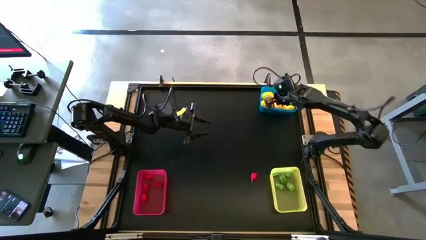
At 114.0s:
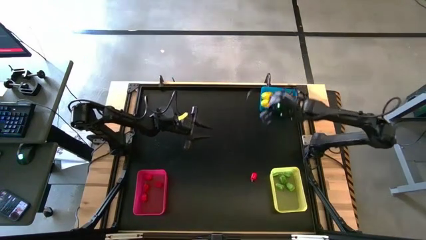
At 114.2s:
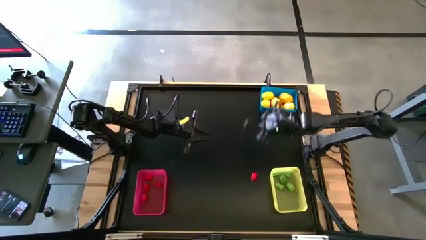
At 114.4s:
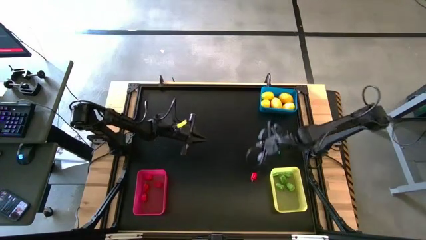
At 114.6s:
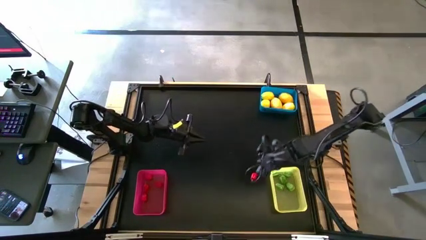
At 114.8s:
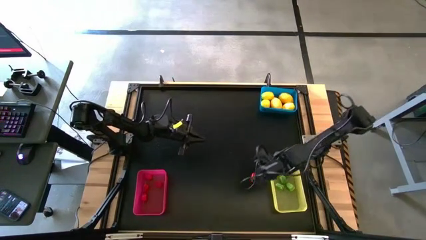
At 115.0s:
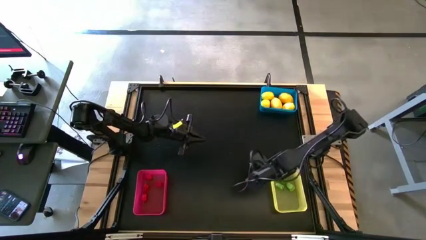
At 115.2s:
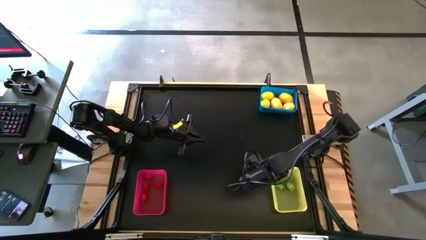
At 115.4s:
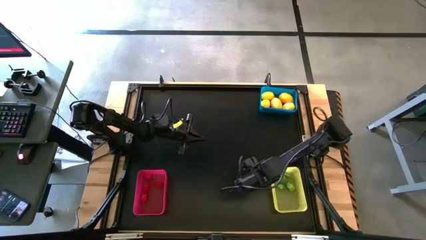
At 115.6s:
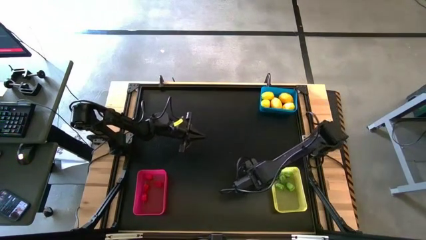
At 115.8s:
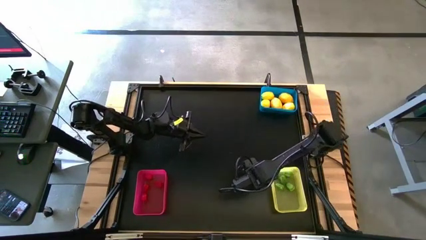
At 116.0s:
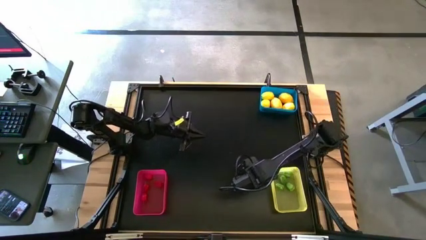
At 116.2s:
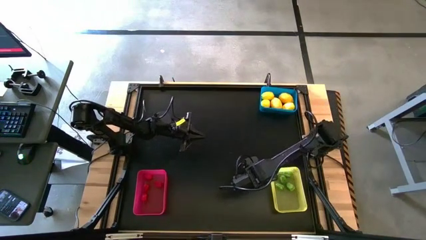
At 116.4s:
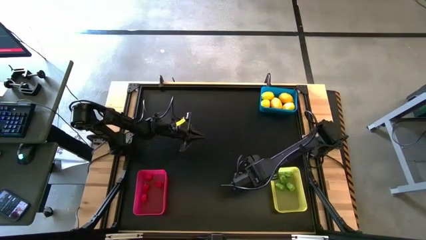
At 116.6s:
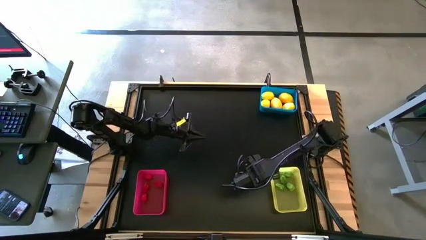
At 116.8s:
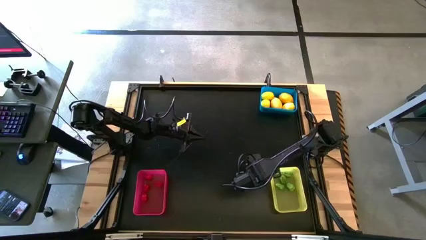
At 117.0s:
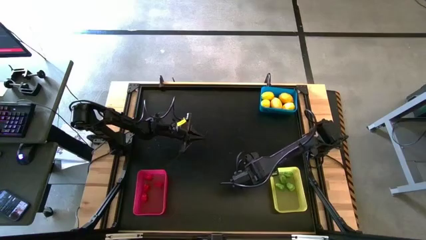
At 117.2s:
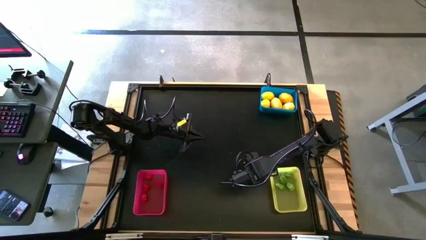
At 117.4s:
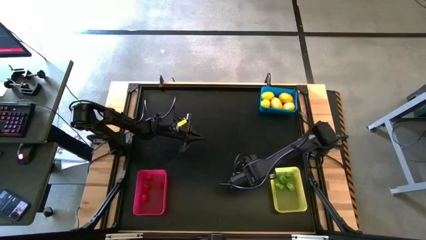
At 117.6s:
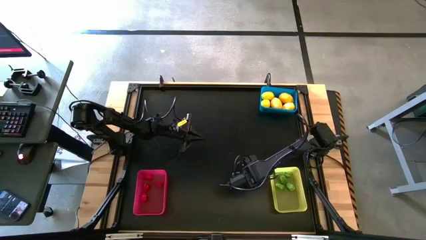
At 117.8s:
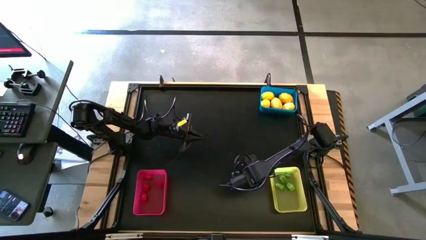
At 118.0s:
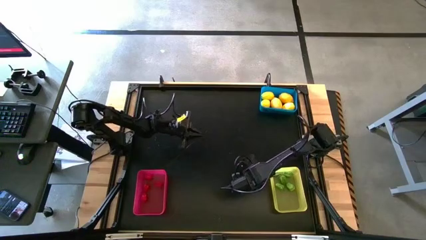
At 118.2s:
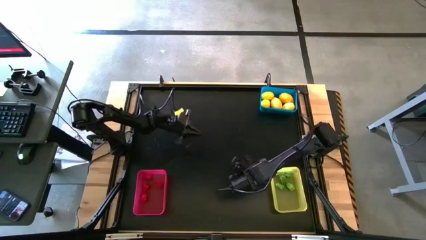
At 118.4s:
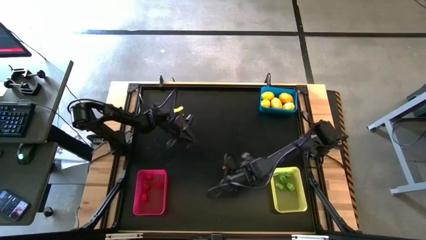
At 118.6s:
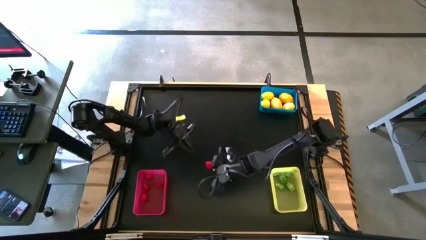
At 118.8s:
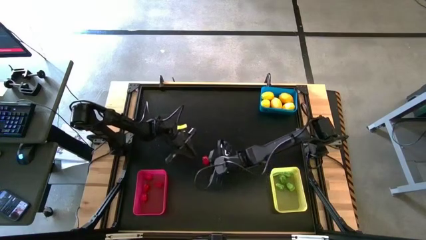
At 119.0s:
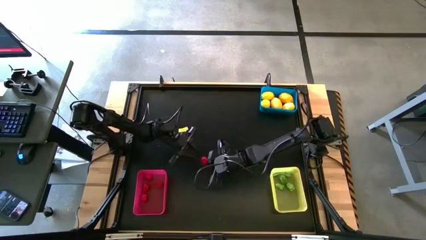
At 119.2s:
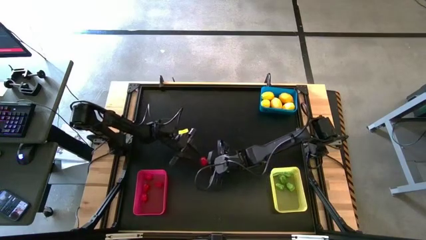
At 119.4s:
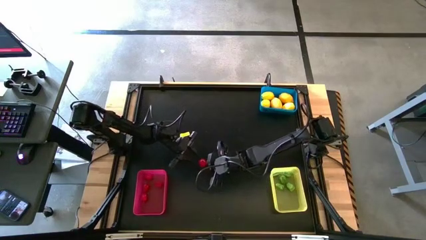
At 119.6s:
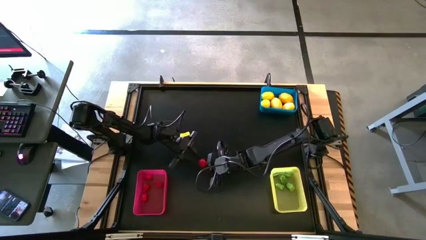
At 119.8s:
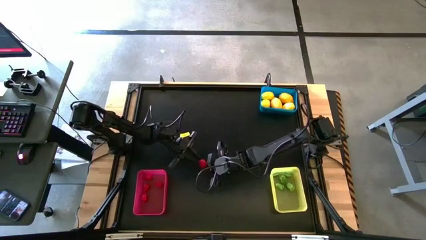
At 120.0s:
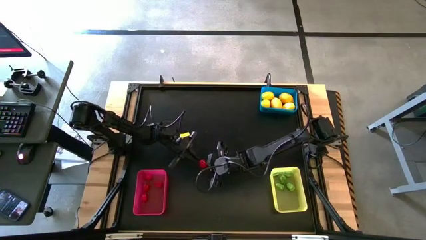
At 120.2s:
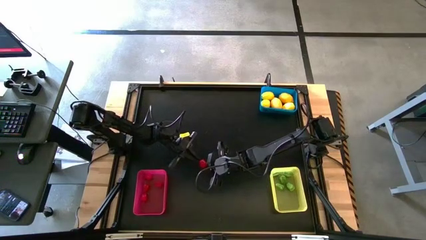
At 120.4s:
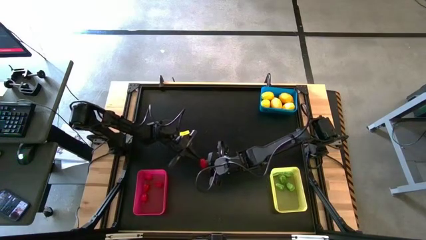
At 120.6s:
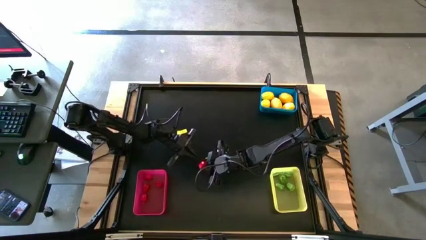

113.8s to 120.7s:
Task: Sort produce into baskets
Put the red chili pepper into the red bin

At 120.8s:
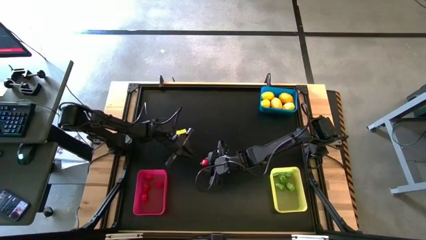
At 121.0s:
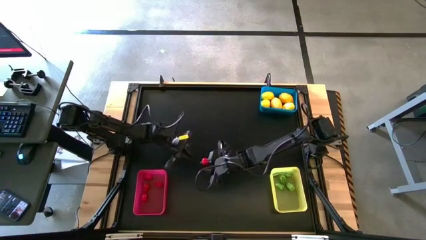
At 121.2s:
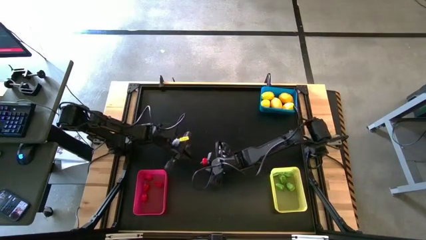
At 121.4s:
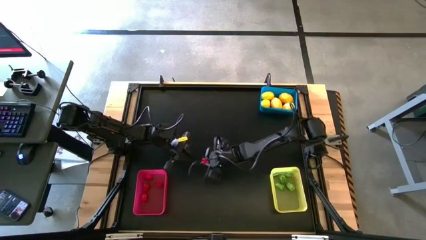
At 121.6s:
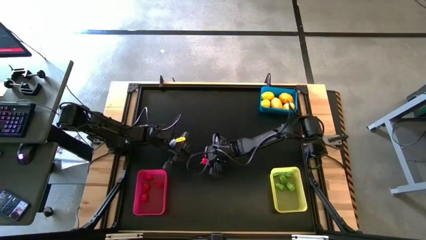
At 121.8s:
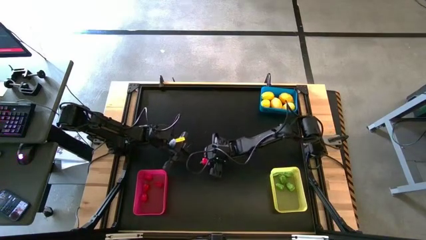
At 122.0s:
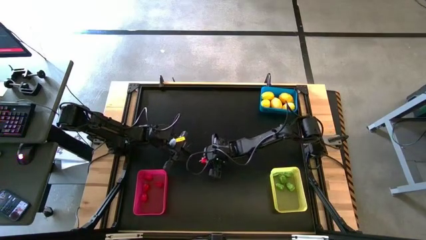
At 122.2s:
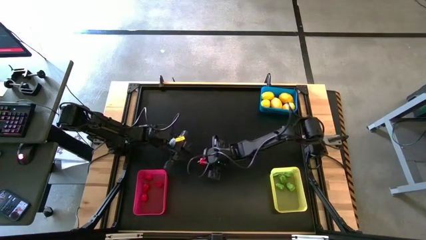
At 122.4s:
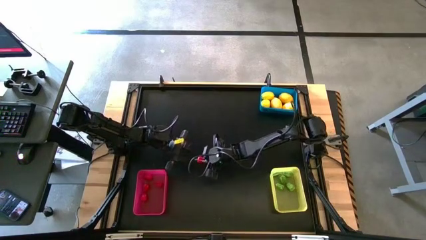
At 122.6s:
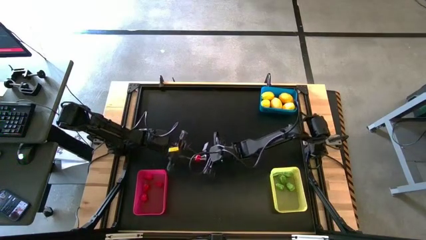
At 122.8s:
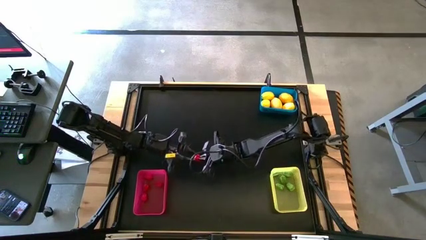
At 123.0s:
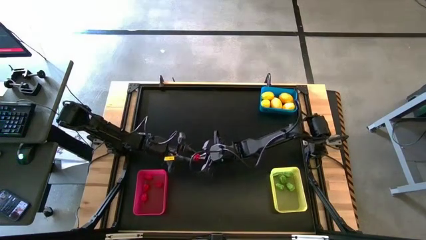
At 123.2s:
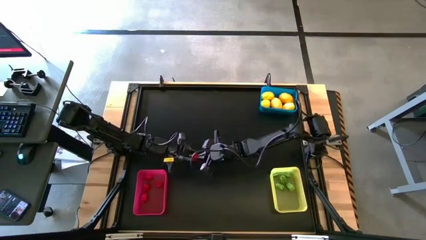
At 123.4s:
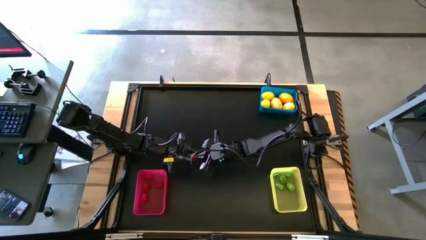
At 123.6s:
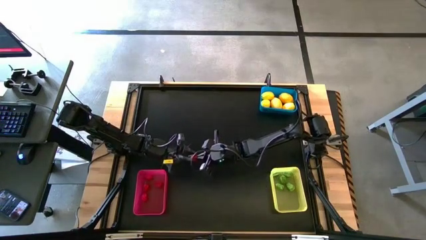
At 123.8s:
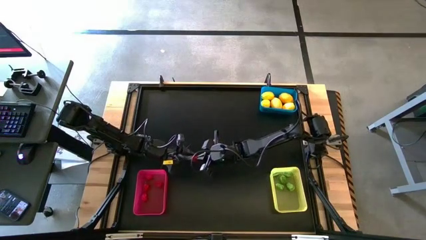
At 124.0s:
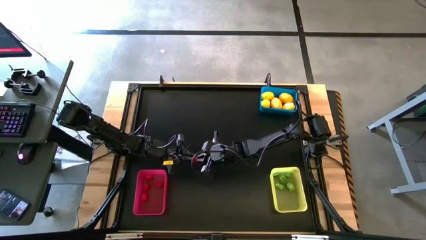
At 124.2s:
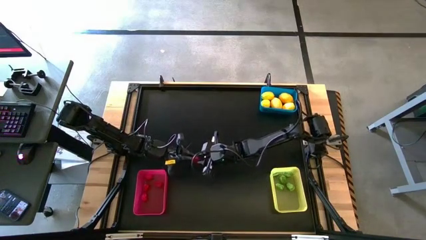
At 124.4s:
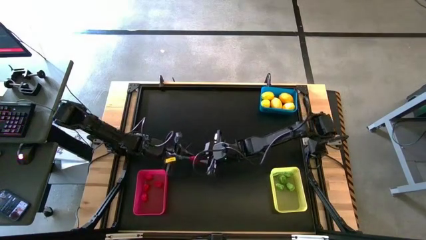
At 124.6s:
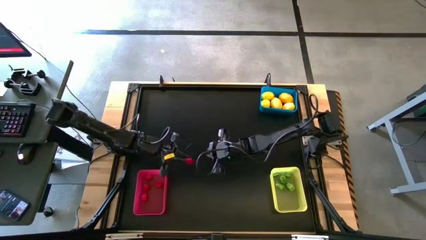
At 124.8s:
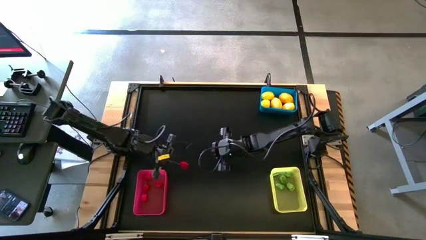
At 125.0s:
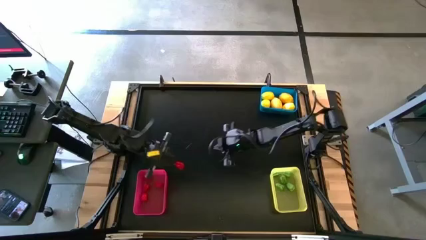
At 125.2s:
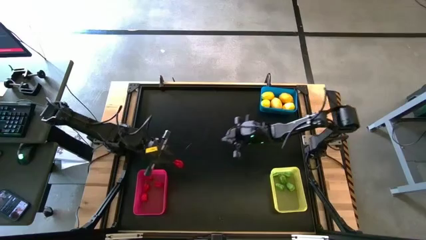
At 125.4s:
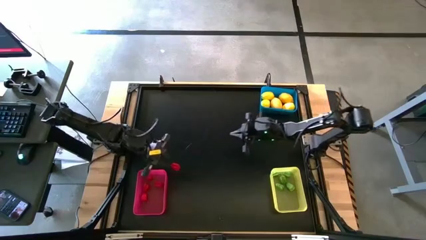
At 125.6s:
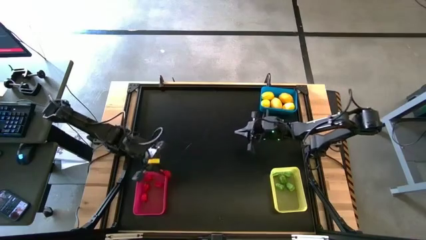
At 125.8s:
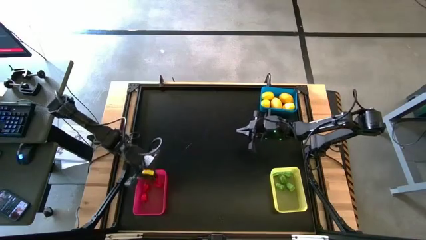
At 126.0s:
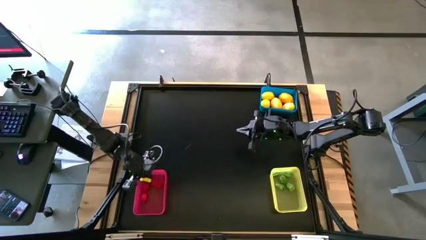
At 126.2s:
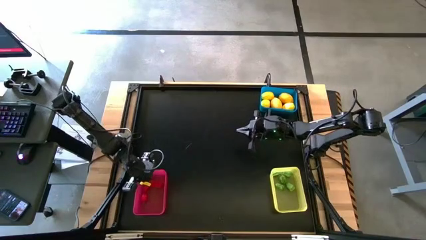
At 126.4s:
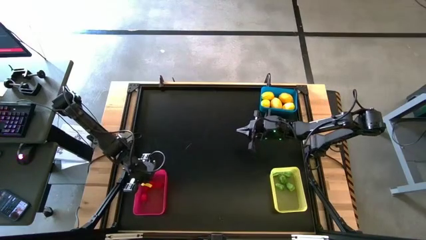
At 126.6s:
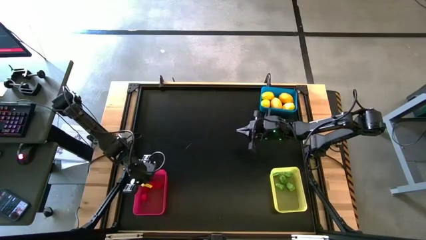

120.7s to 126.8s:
Put the red chili pepper into the red bin

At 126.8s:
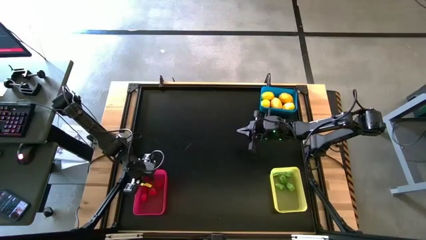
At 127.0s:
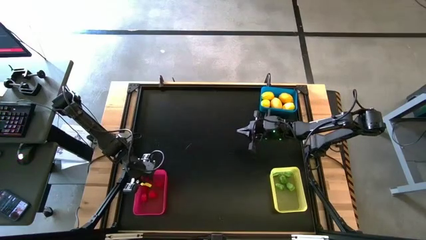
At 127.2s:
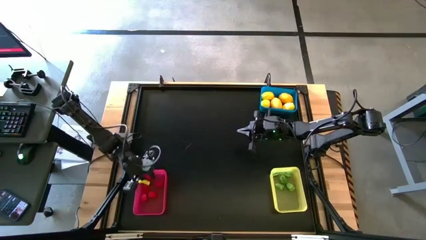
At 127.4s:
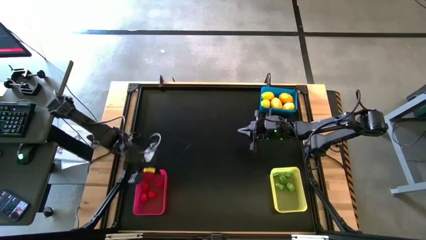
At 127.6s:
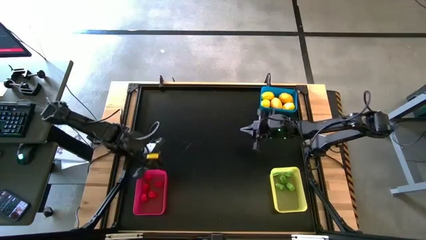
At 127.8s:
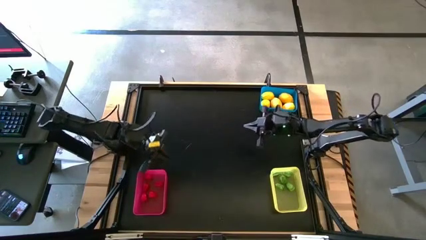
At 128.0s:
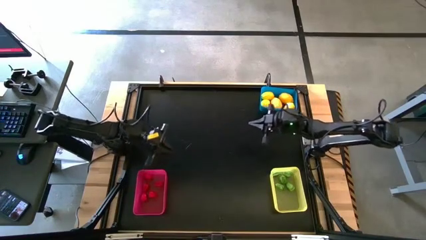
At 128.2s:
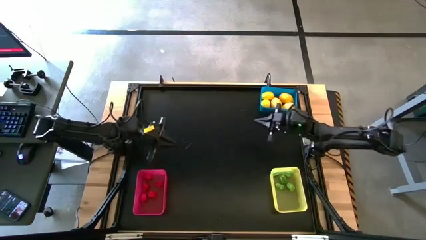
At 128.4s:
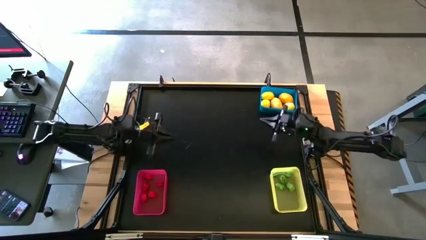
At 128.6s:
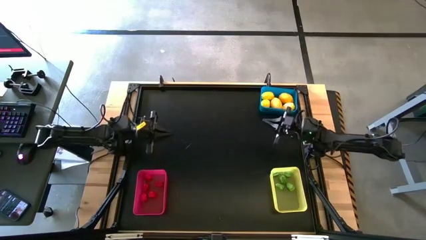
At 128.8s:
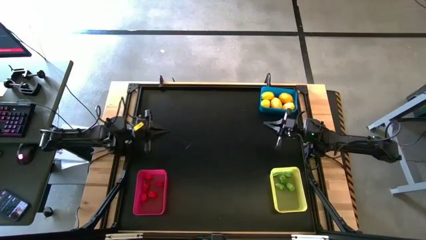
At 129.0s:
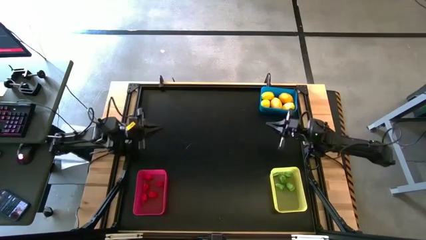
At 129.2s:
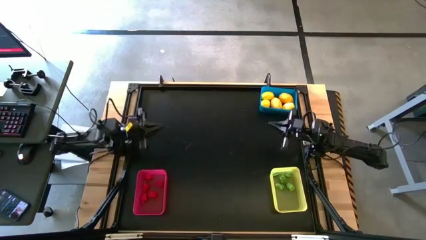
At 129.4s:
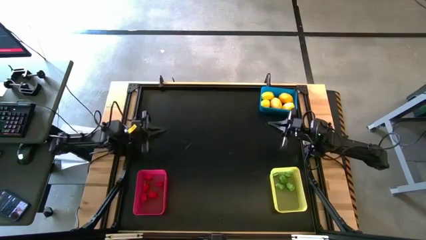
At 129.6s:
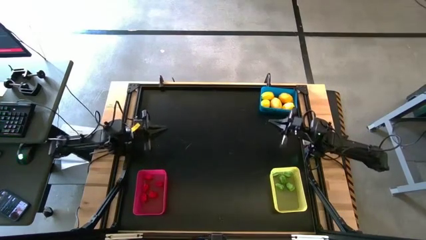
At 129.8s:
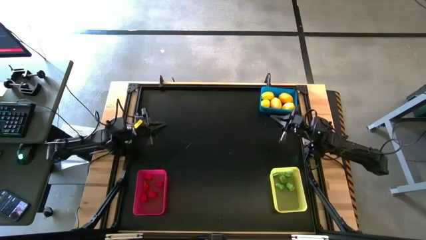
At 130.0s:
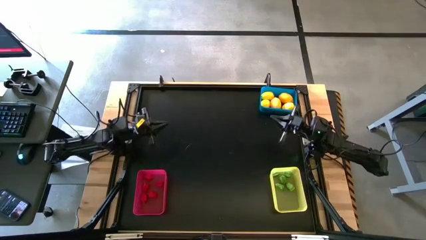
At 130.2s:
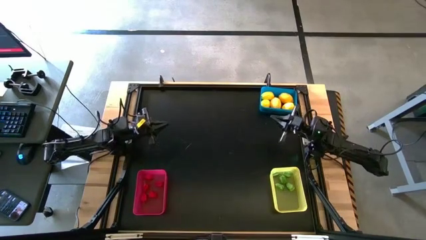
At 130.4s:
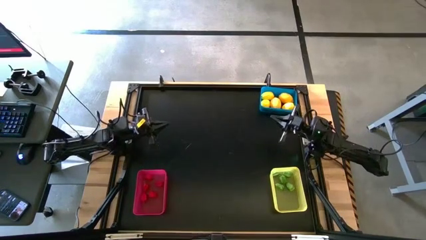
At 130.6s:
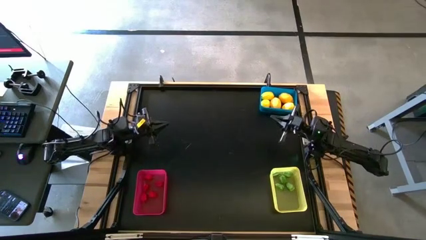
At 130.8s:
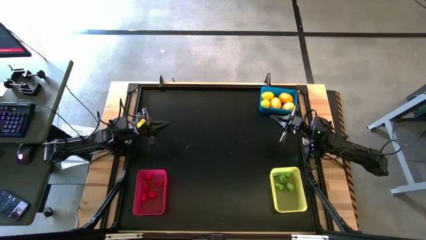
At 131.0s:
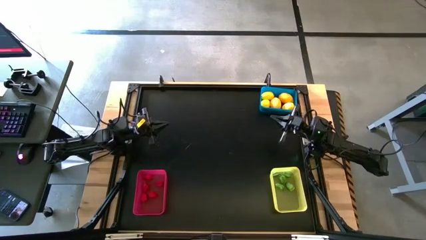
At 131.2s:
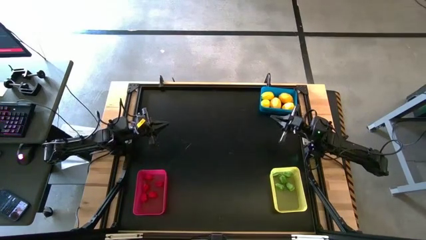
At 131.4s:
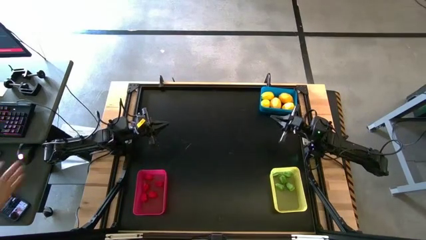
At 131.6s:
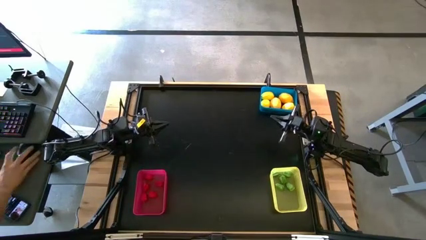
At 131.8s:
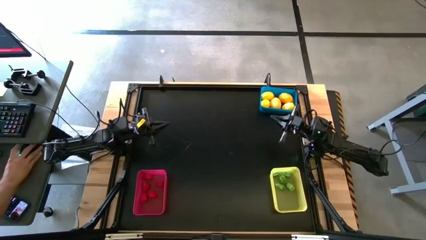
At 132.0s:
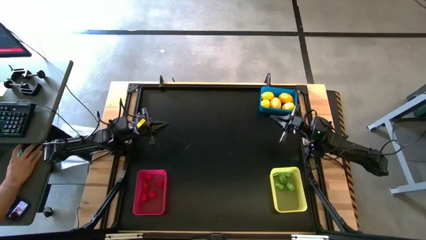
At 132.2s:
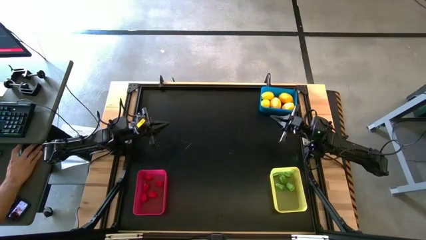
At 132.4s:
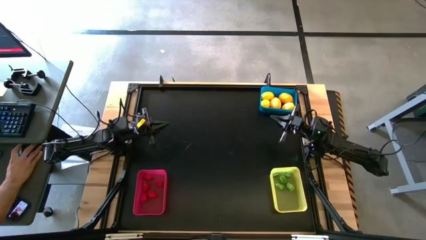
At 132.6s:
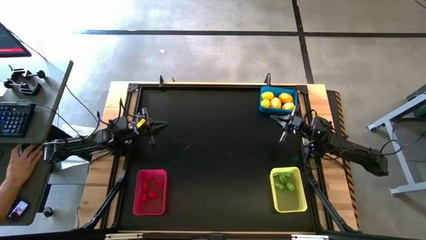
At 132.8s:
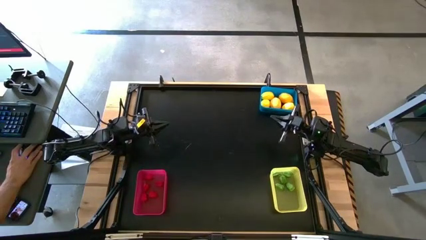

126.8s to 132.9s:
Return to Home Position
